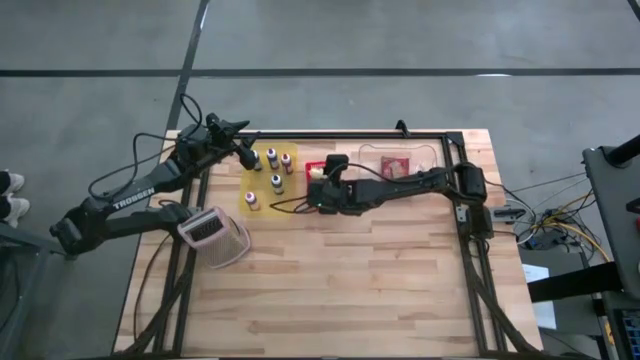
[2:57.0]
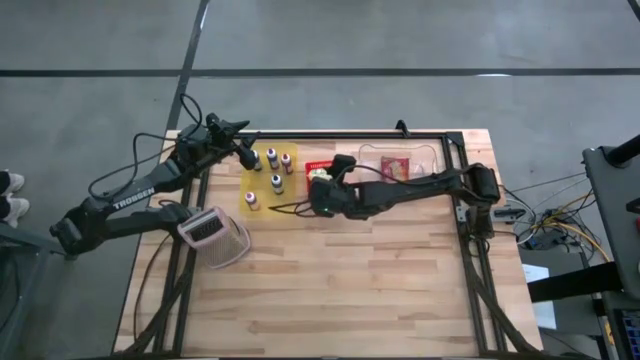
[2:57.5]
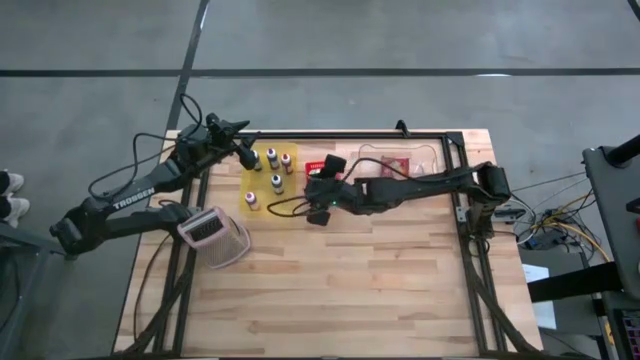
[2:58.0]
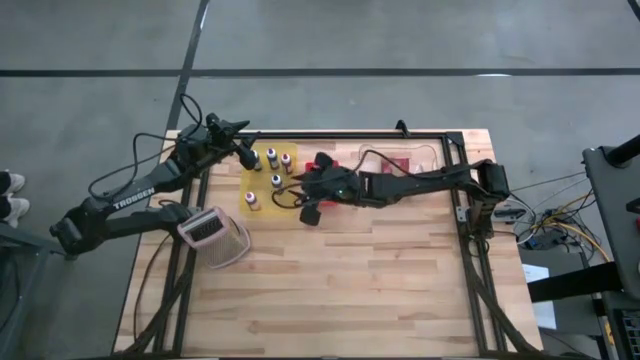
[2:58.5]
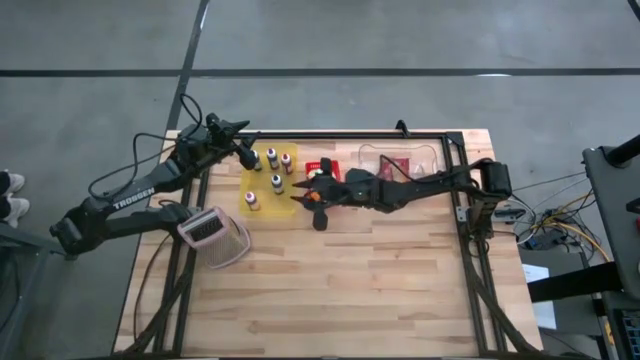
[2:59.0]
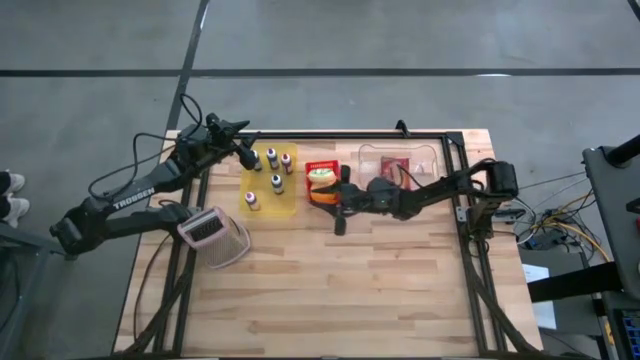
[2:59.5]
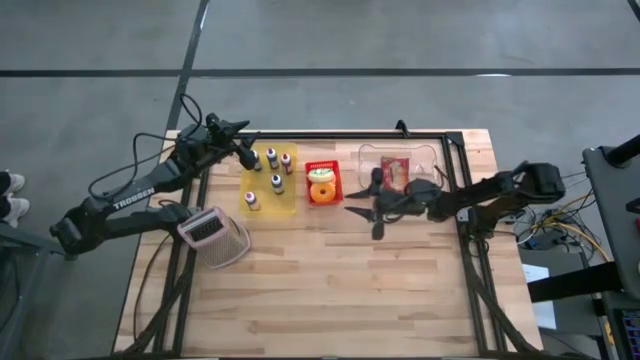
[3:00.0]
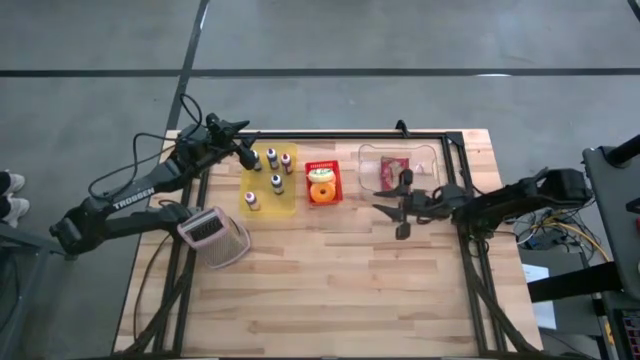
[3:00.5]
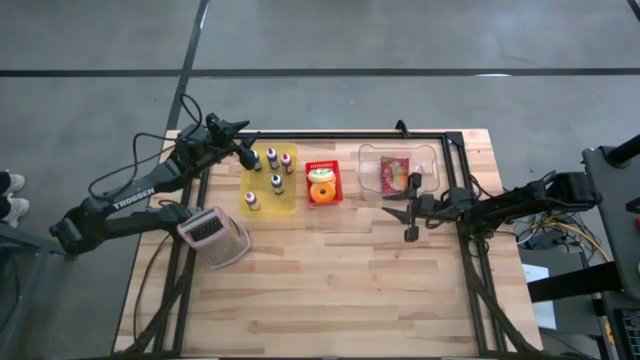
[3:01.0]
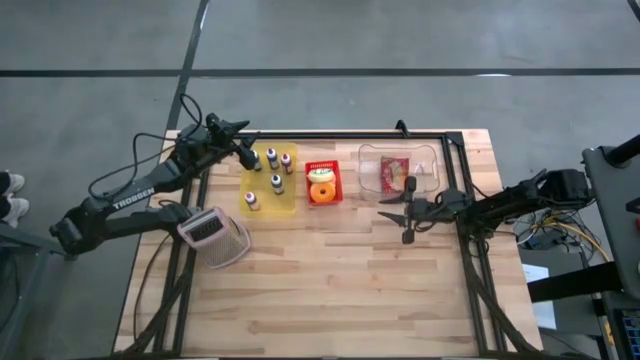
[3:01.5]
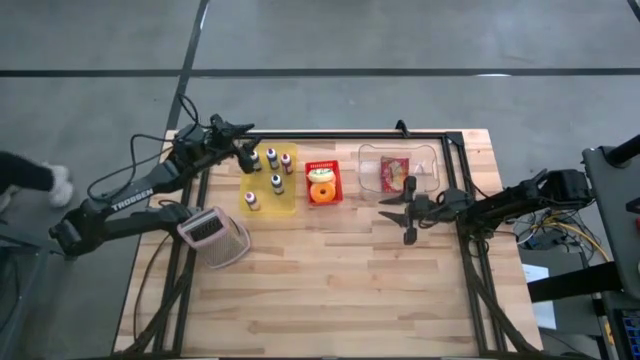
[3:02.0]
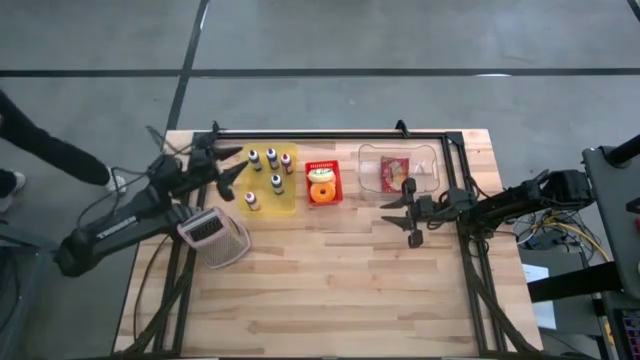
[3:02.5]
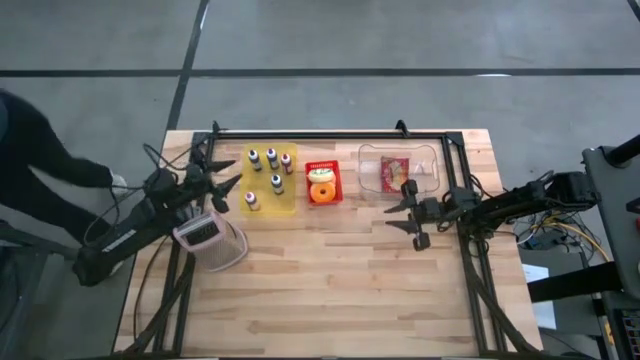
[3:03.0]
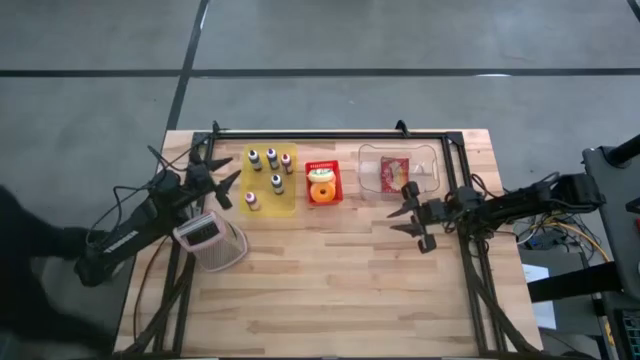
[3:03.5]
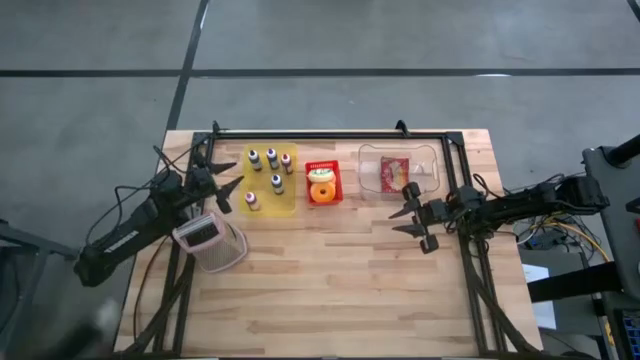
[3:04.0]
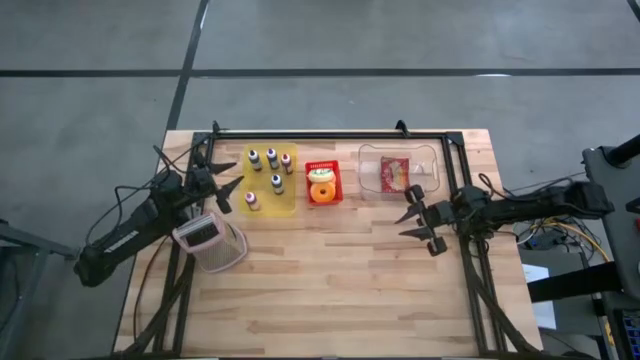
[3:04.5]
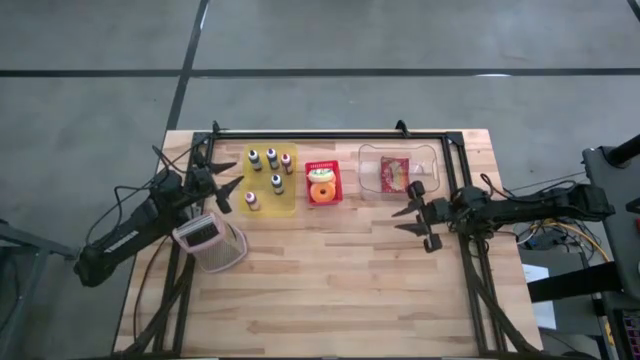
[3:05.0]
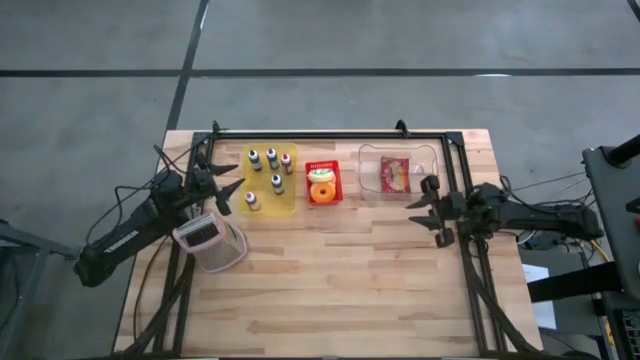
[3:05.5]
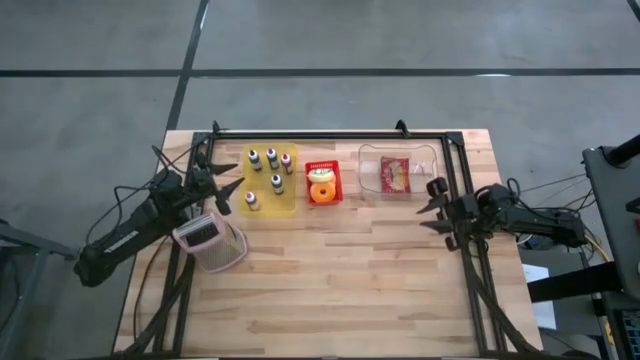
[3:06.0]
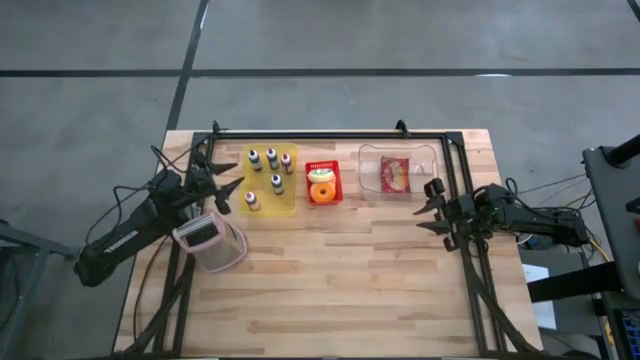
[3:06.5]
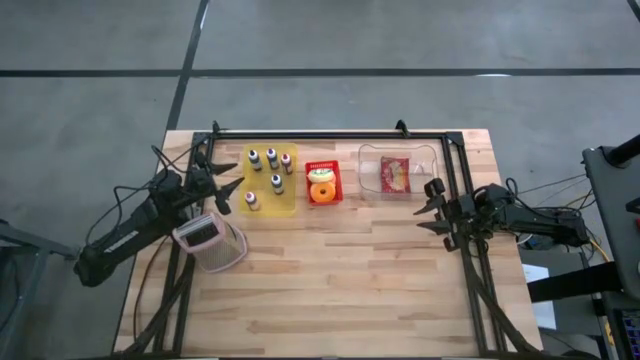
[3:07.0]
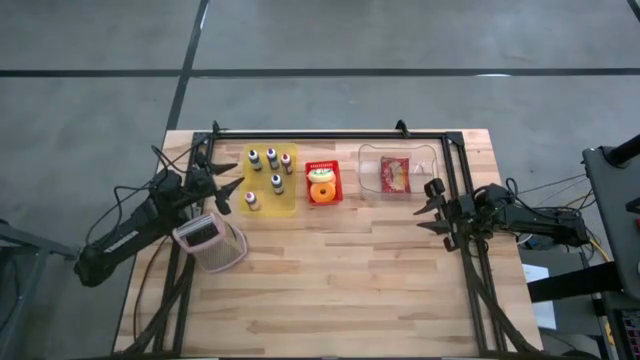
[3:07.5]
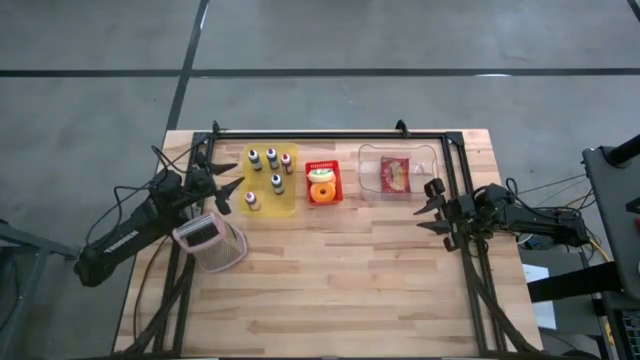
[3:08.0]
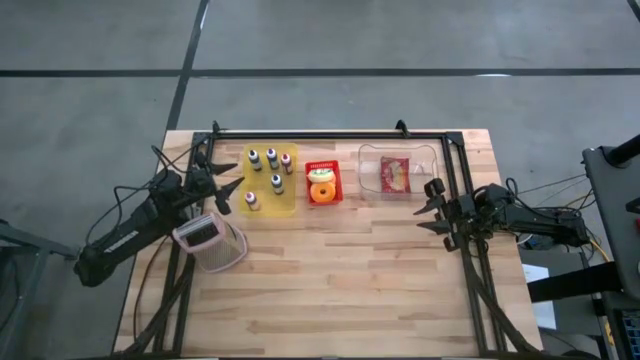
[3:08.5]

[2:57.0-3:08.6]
Task: Pick & Place Food Item
Return to Home Position

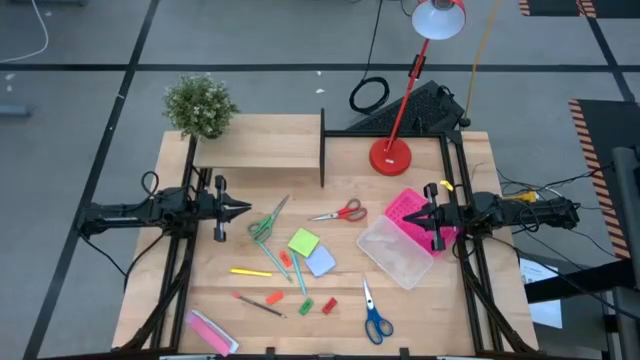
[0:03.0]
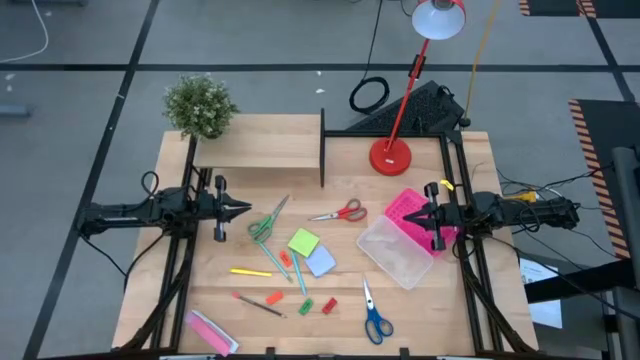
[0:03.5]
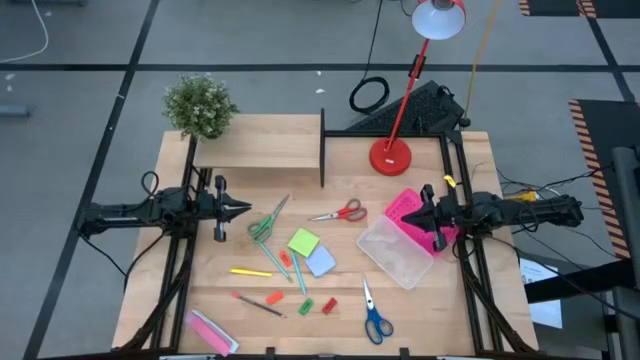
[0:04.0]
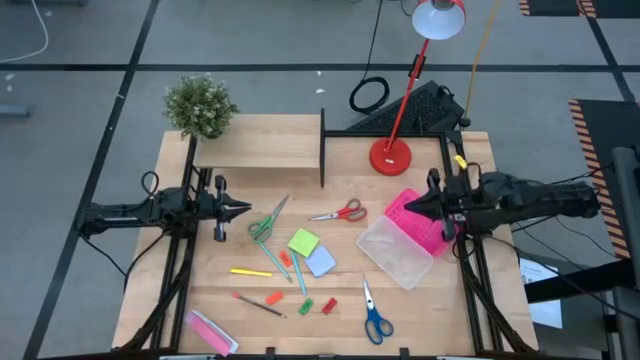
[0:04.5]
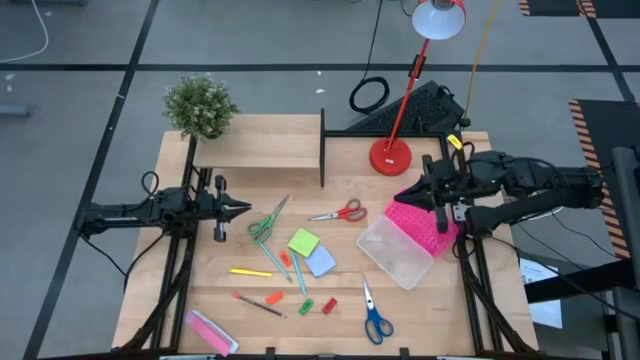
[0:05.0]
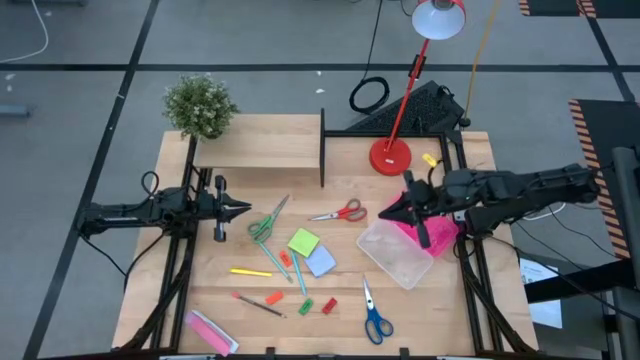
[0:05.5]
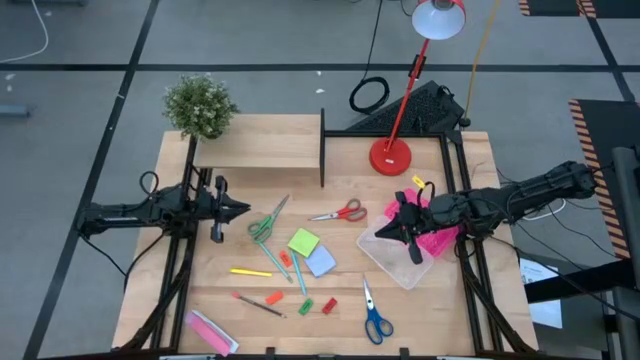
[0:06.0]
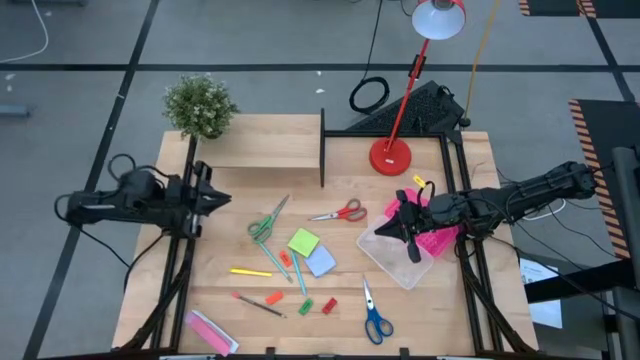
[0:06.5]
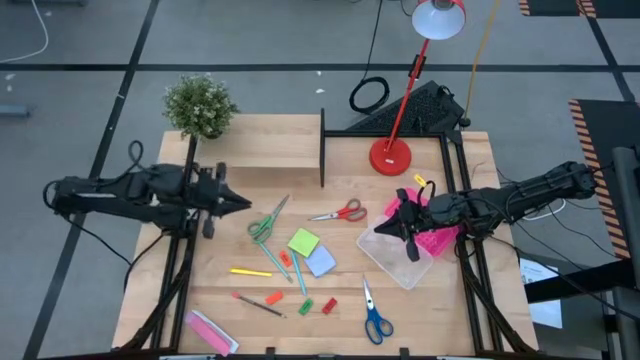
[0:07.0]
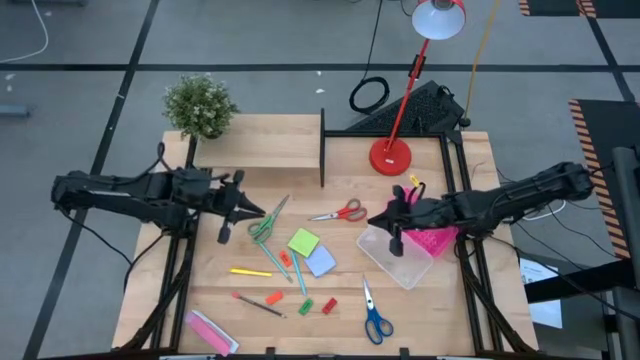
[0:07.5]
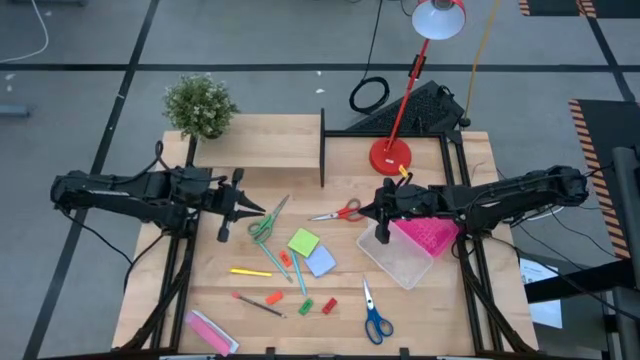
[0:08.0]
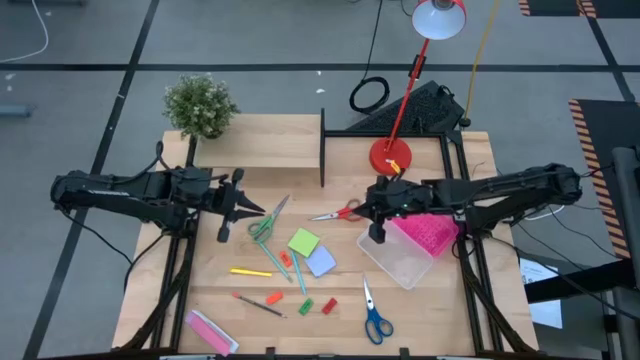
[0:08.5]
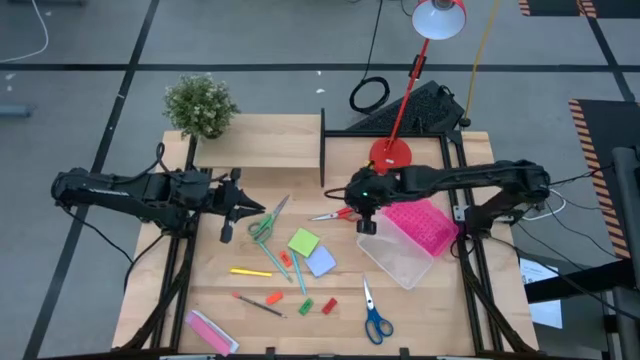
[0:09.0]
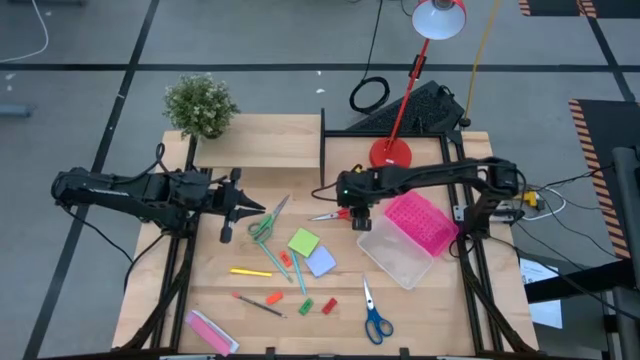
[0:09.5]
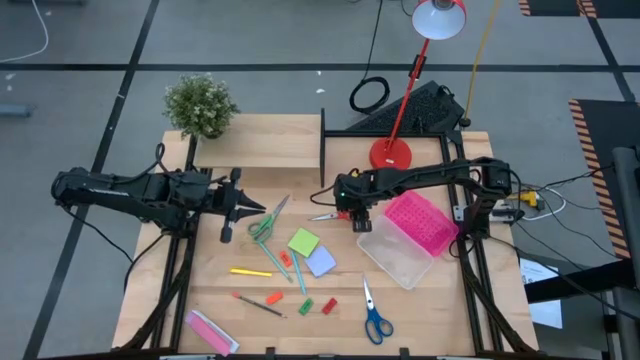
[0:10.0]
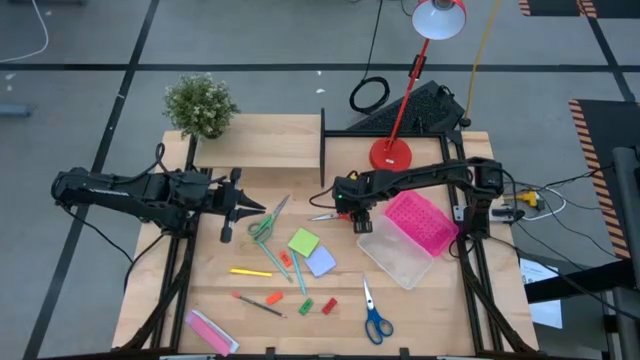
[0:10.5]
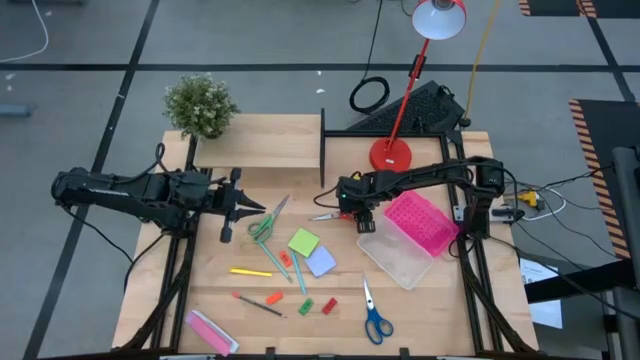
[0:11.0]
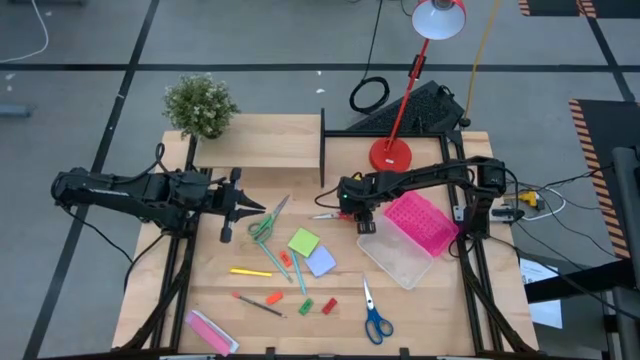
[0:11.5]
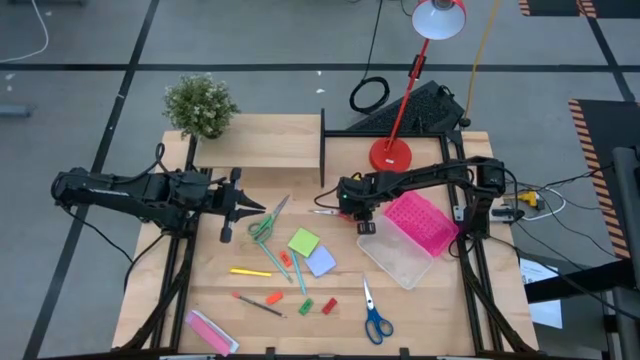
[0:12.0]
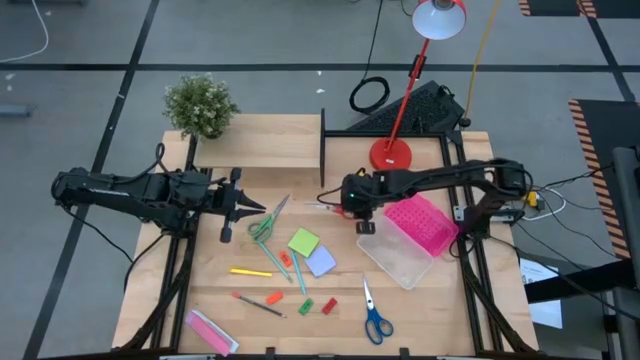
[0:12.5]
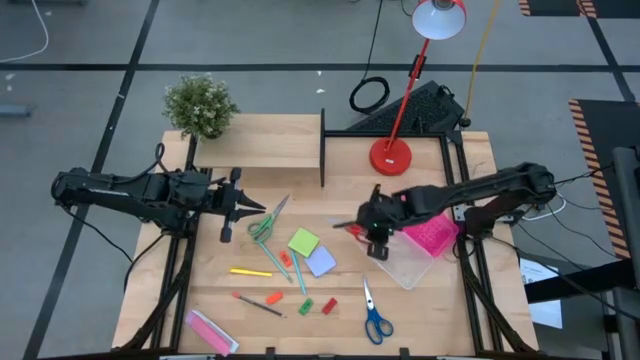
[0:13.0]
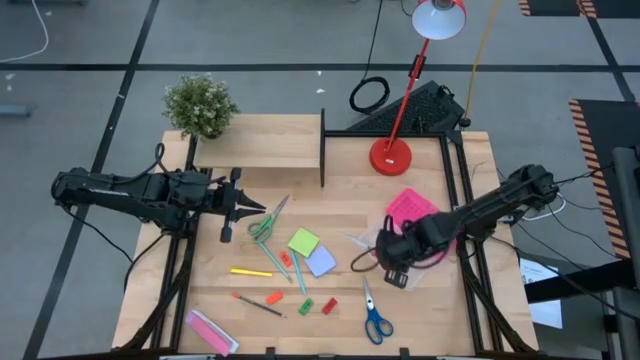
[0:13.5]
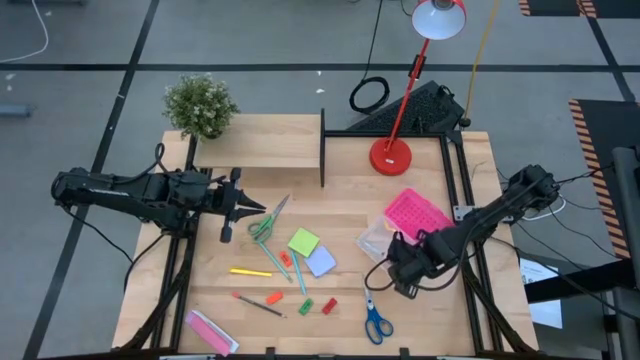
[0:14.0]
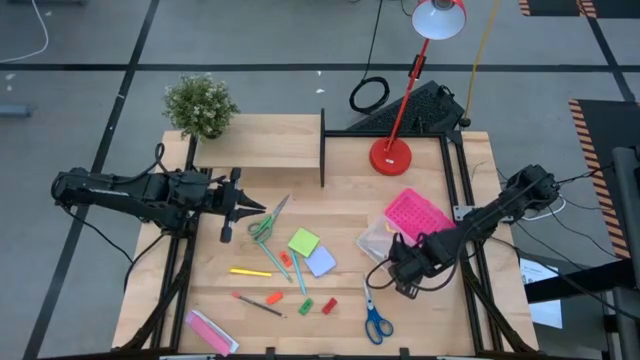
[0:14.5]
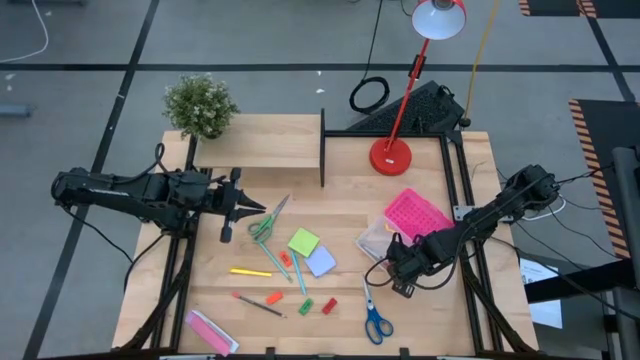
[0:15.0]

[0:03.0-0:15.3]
Task: Pack school essentials
Put the red scissors into the pink supply box
